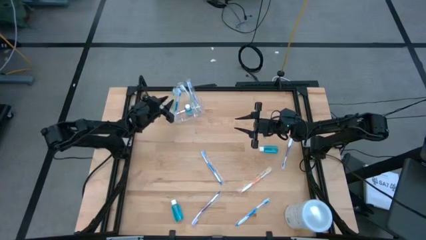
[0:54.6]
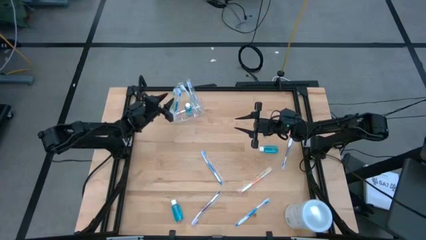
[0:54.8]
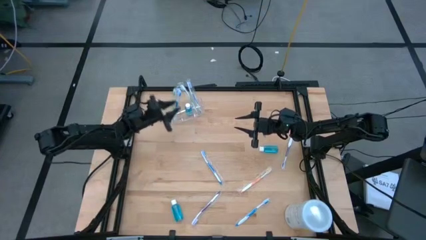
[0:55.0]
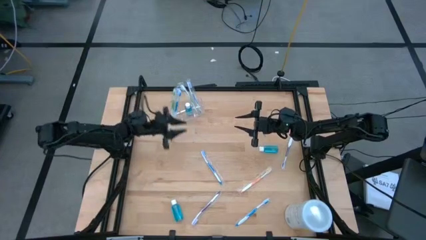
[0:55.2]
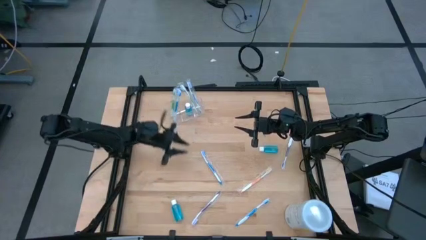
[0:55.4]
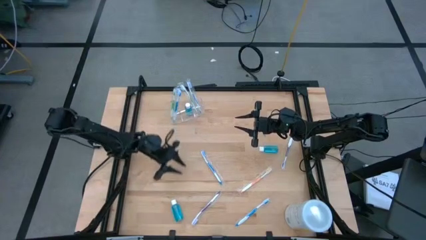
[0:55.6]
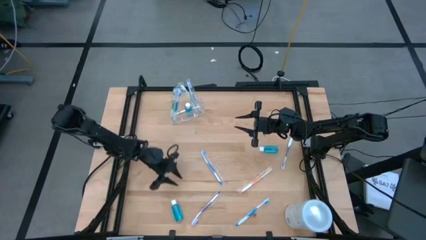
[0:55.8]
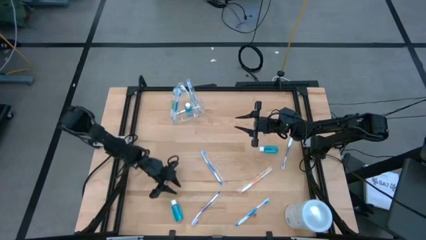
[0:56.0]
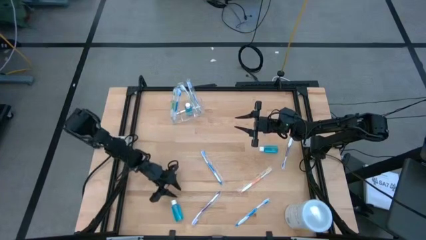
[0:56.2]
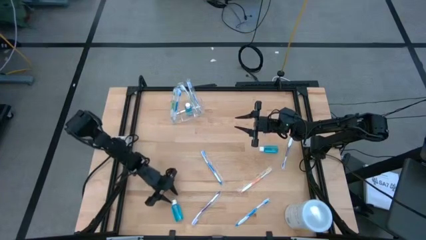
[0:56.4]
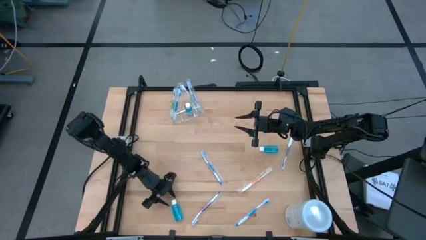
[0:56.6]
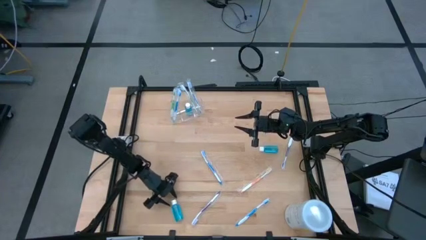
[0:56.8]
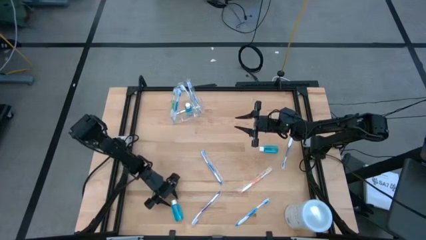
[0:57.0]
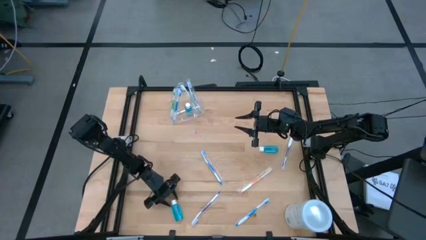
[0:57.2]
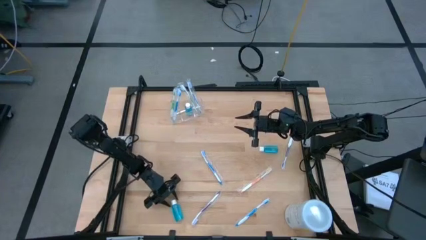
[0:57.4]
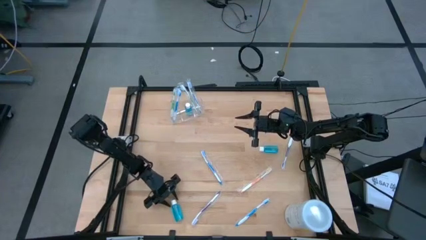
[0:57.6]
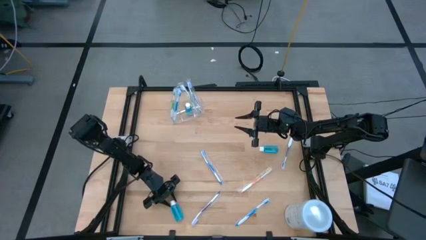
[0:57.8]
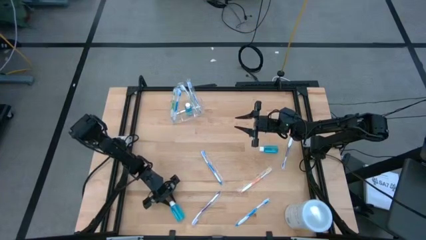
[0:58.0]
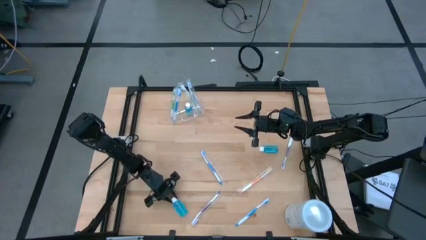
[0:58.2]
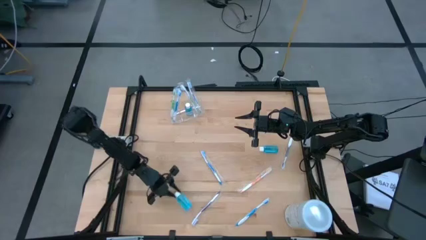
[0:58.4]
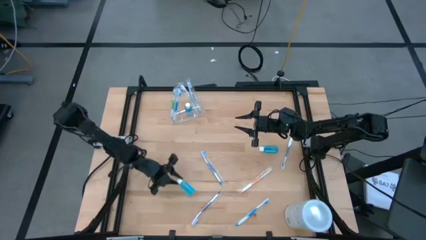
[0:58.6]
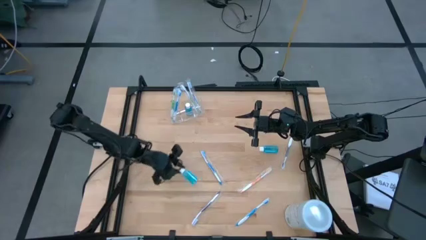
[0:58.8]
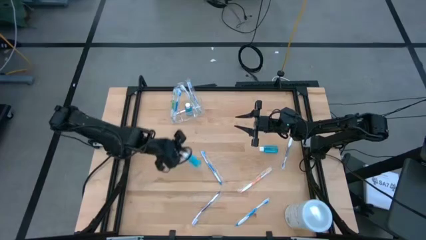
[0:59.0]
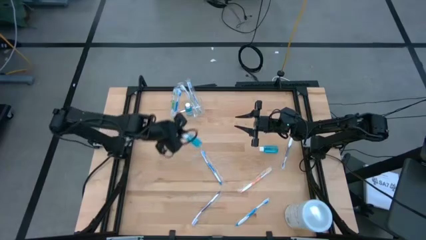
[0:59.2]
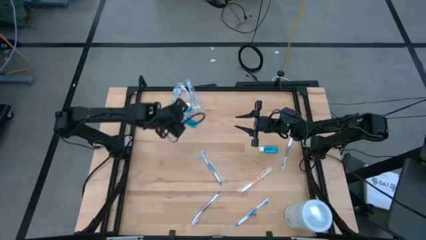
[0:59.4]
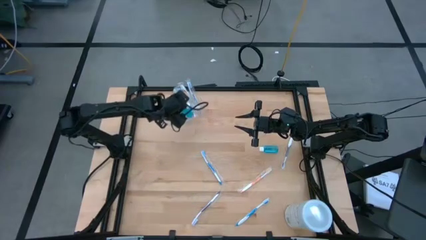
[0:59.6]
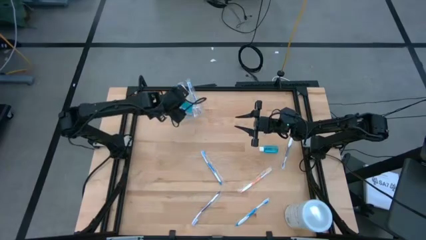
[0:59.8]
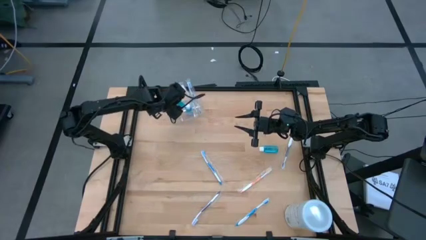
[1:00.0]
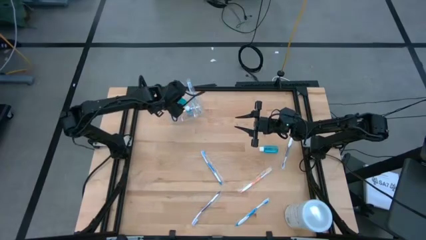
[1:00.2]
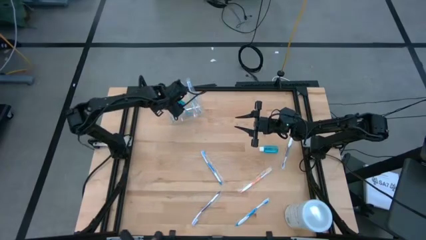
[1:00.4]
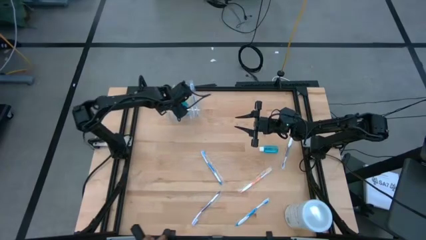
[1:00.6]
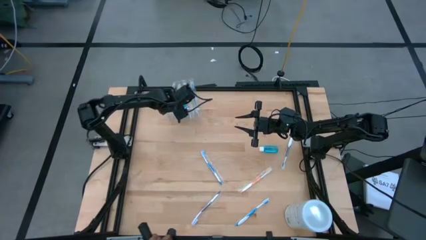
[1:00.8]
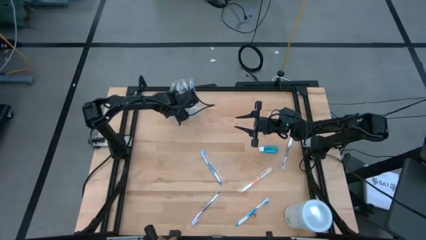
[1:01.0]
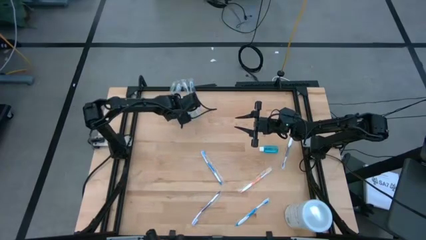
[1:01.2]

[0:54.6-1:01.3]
Task: Pick & Place toothbrushing station
Put the bottom small blue bottle into the transparent organizer

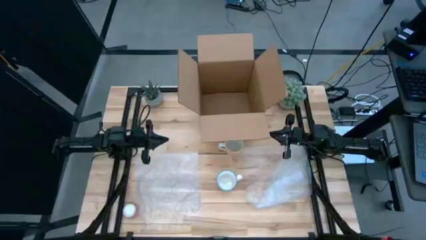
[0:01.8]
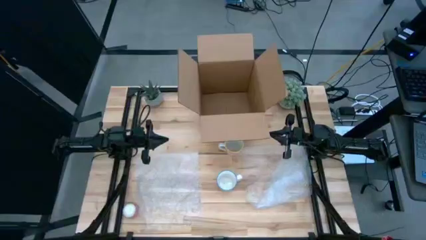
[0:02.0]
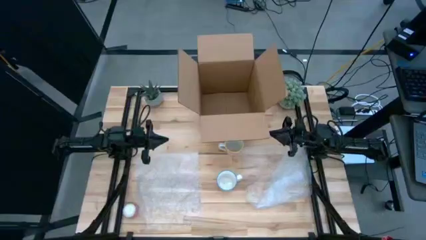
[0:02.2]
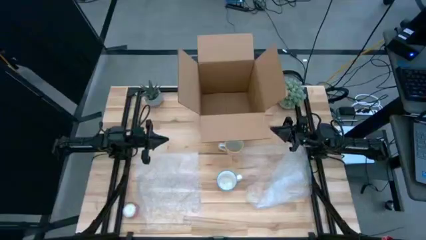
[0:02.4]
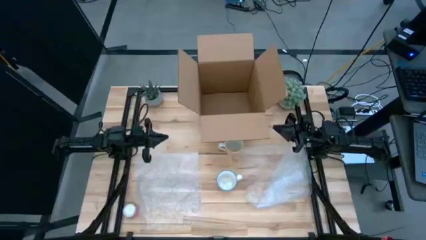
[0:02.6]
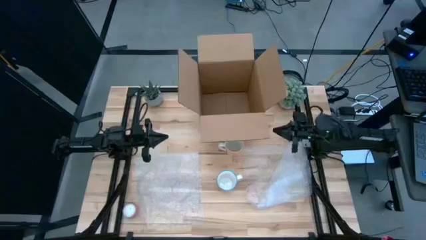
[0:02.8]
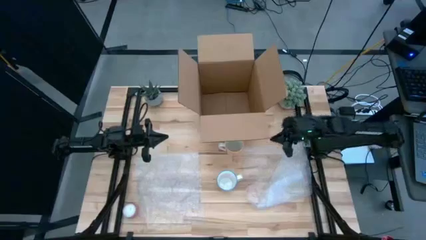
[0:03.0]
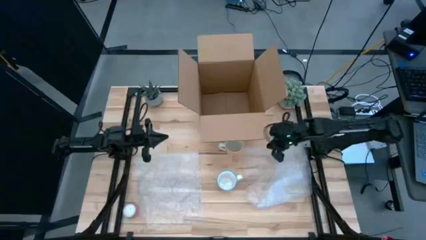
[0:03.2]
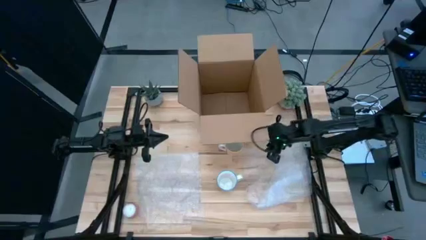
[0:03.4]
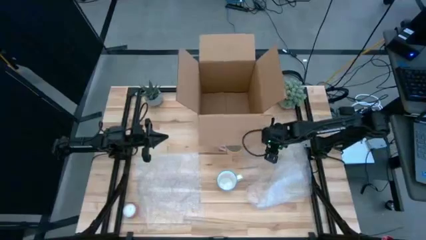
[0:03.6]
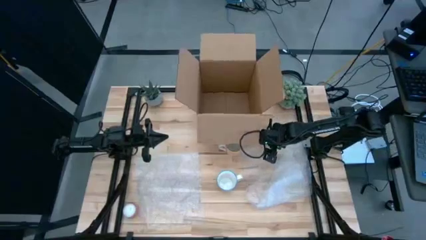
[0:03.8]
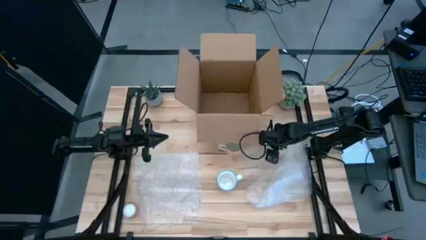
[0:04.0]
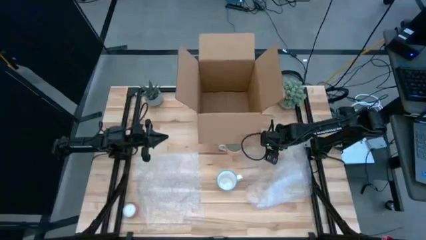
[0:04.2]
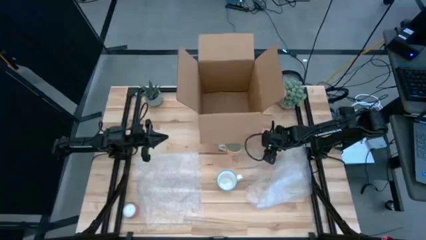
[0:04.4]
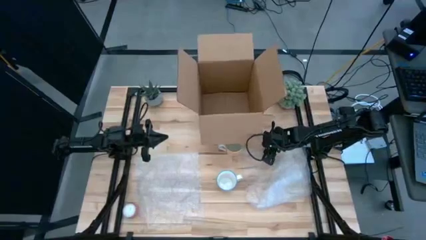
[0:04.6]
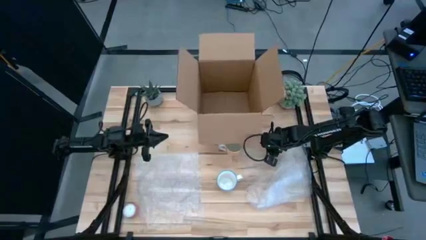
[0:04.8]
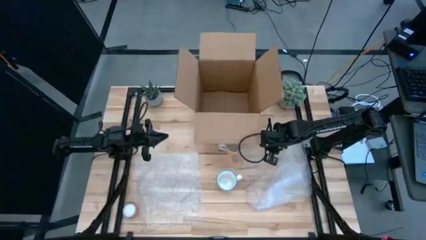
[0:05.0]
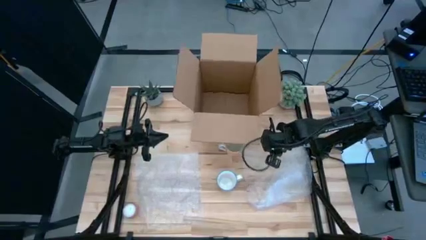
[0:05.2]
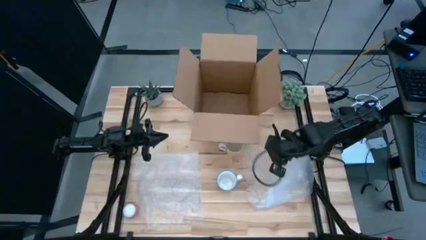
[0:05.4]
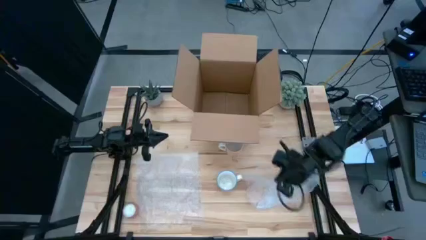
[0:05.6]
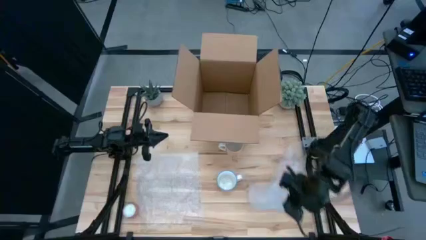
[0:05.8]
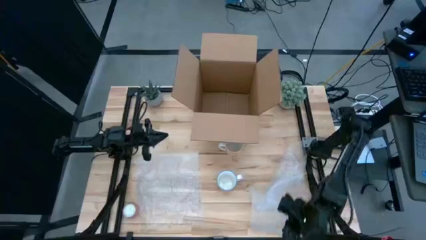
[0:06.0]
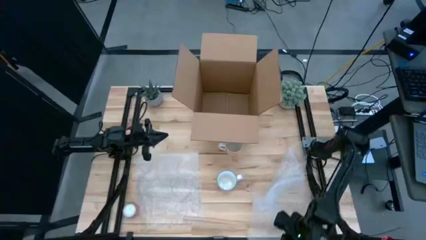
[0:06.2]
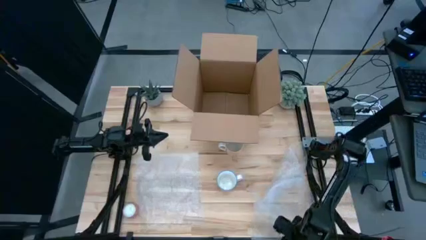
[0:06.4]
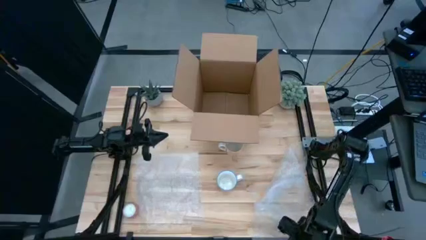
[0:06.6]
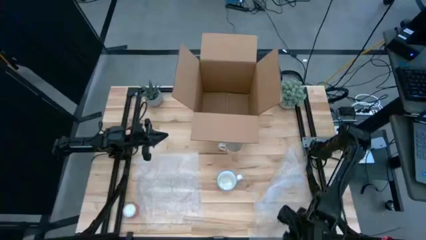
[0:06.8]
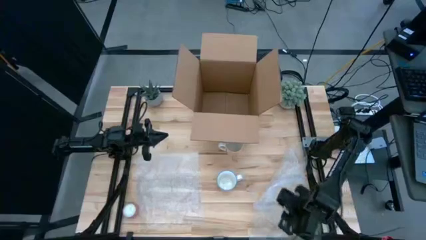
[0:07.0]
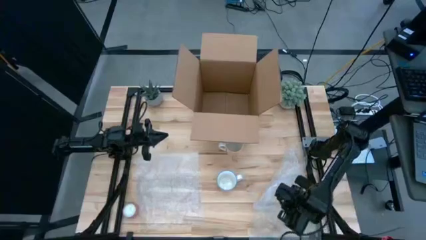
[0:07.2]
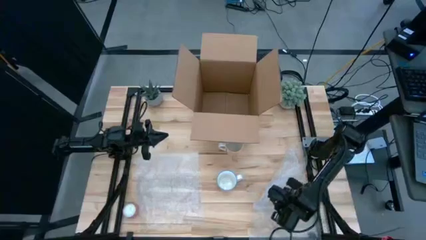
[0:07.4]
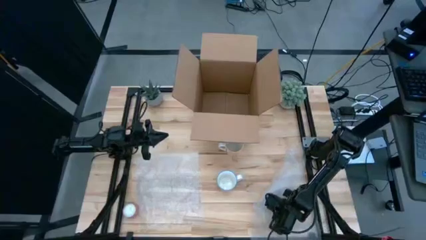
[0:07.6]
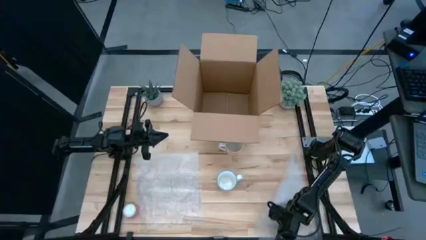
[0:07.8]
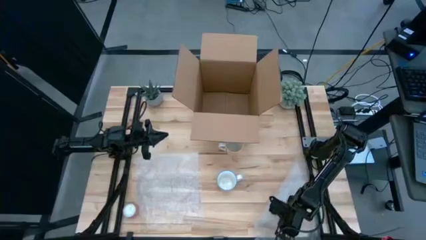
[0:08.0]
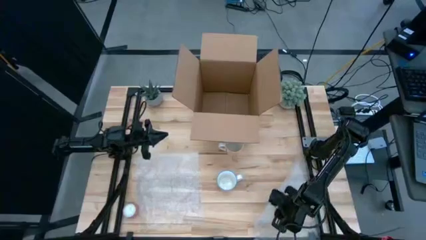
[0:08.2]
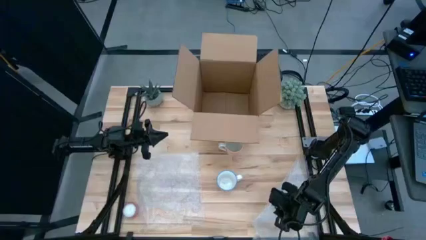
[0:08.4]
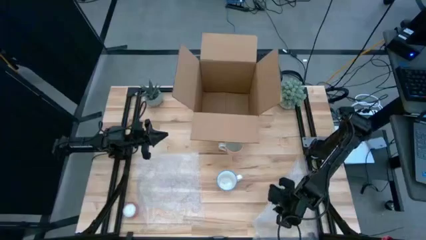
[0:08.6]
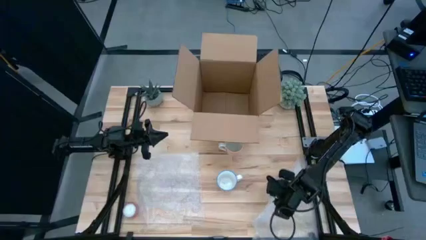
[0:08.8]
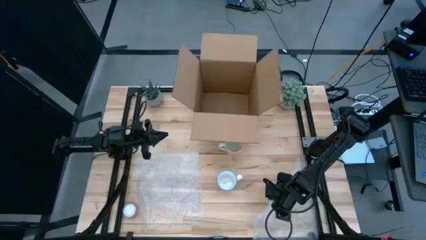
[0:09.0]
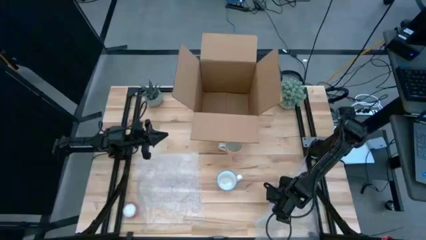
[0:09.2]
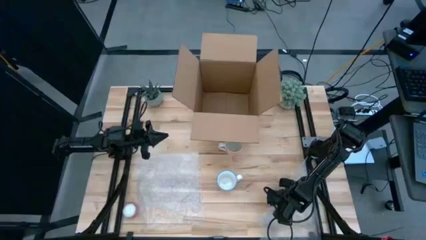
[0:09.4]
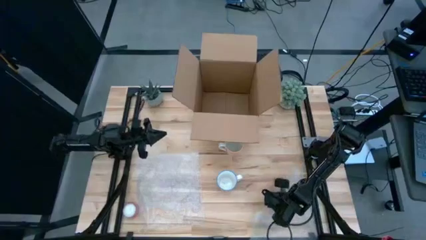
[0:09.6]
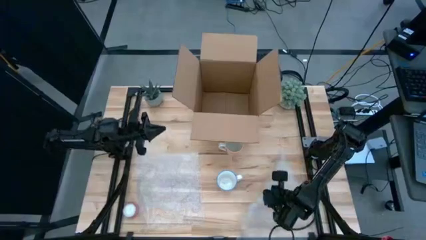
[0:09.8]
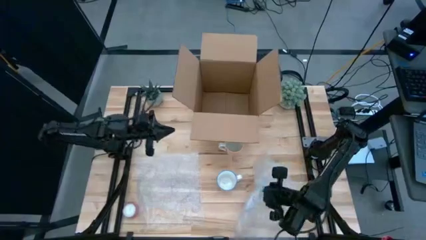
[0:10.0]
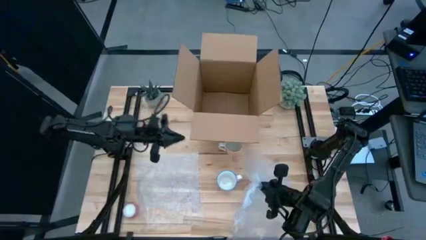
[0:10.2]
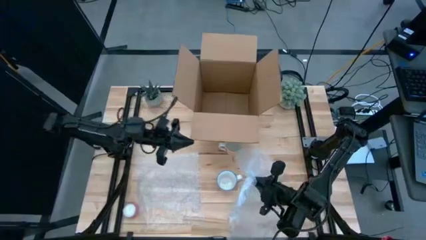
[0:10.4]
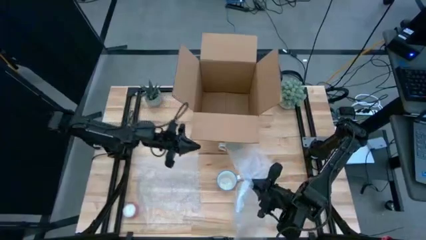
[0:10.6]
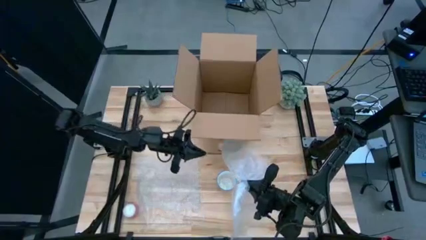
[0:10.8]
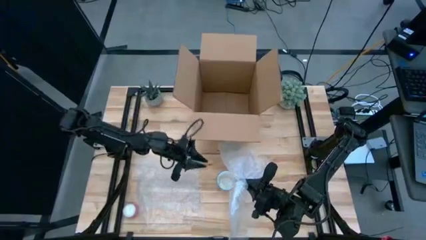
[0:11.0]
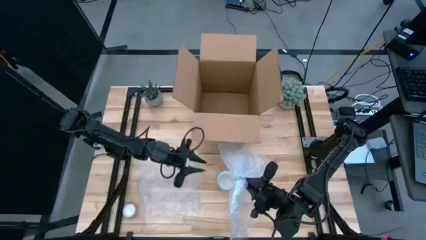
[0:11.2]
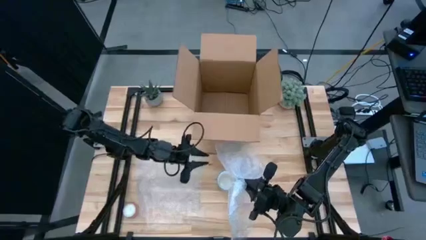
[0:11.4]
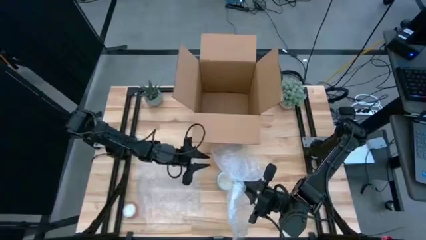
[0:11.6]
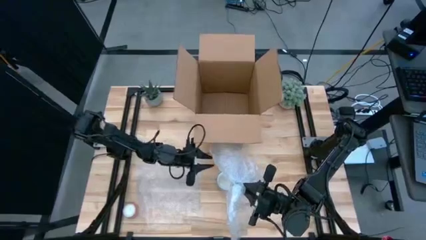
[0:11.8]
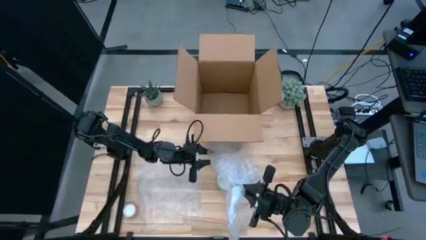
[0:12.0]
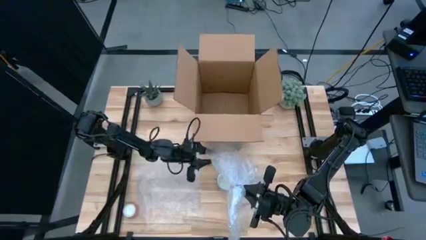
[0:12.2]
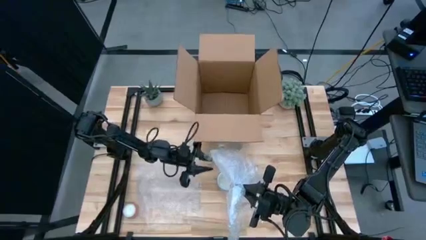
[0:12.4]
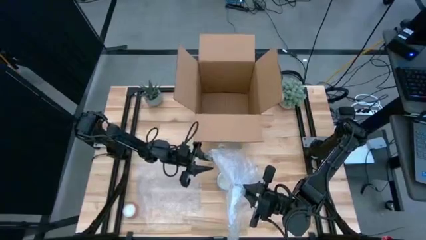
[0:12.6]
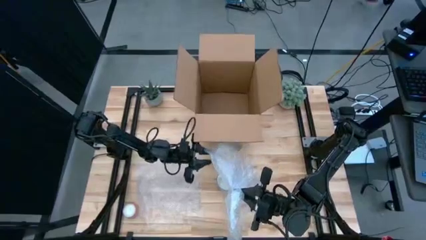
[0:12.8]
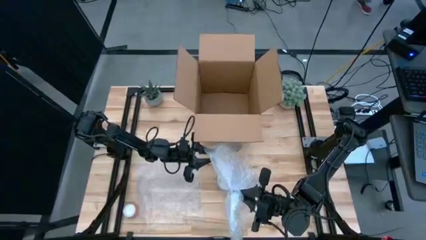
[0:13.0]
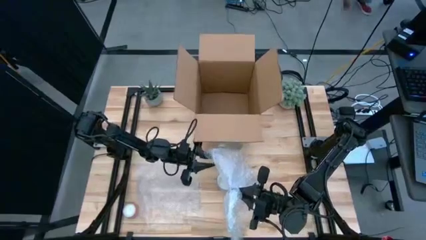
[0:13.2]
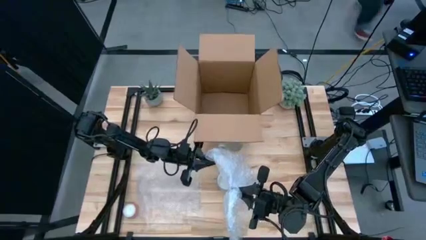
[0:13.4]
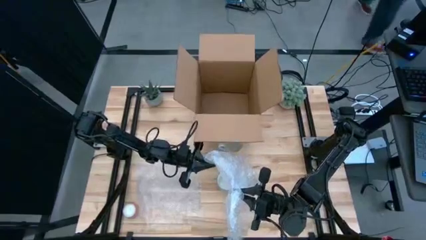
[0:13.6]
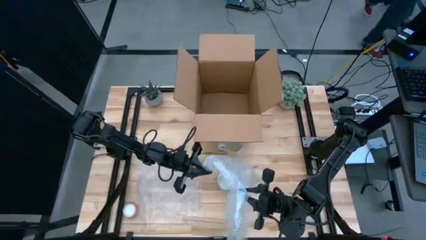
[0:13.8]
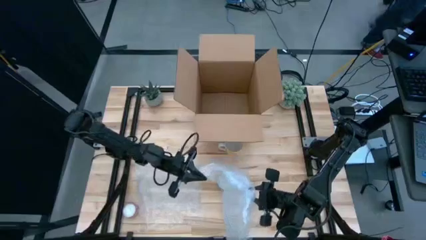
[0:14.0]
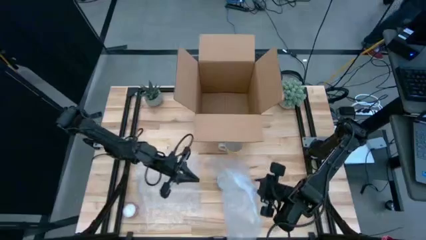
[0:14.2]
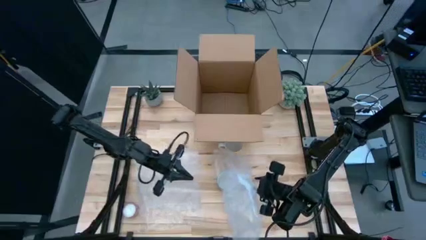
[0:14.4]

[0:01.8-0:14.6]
Task: wrap mug
Prepare the right transparent bubble wrap
